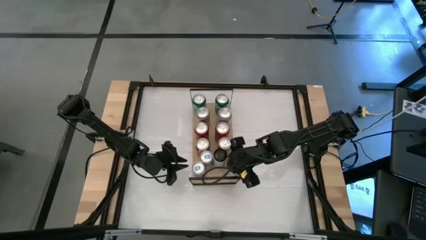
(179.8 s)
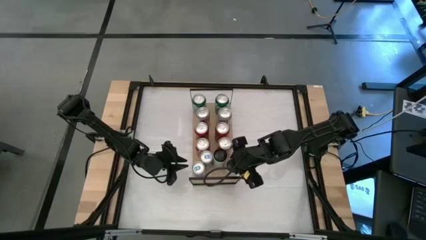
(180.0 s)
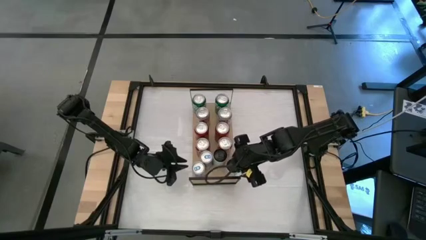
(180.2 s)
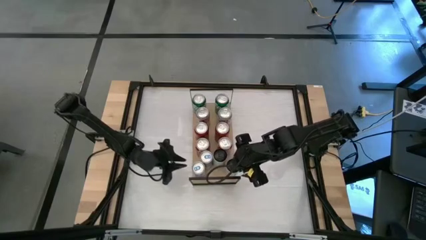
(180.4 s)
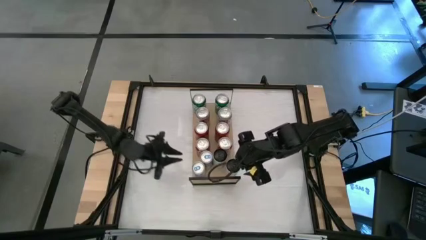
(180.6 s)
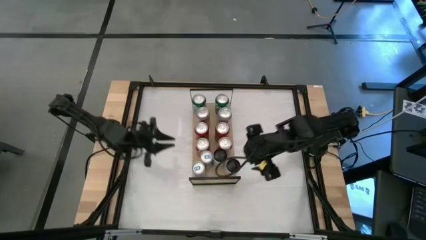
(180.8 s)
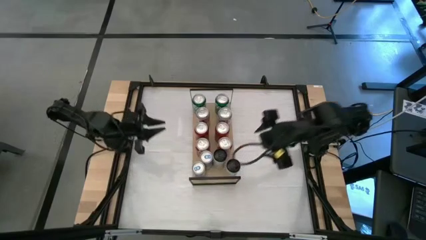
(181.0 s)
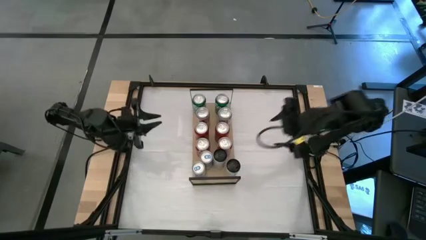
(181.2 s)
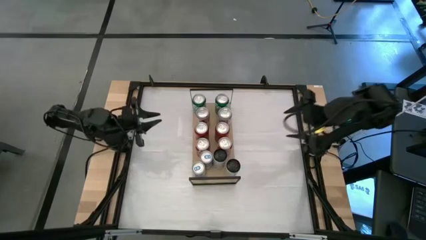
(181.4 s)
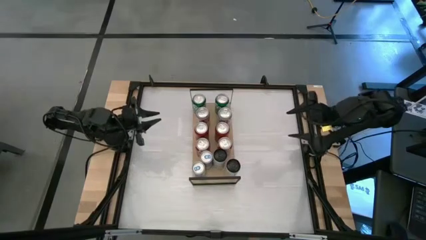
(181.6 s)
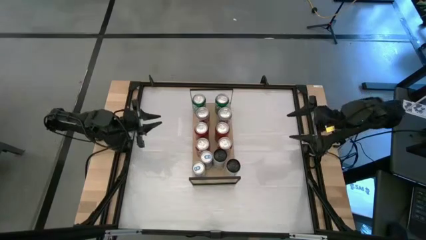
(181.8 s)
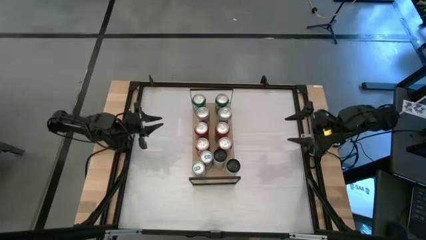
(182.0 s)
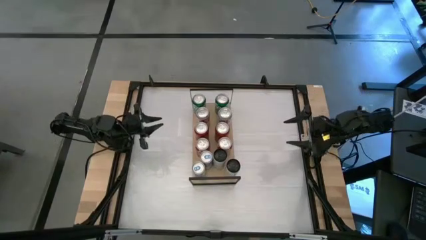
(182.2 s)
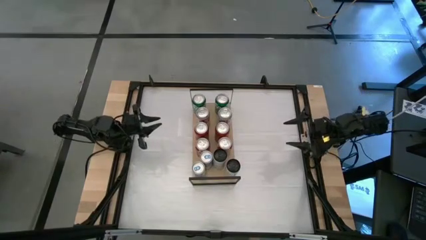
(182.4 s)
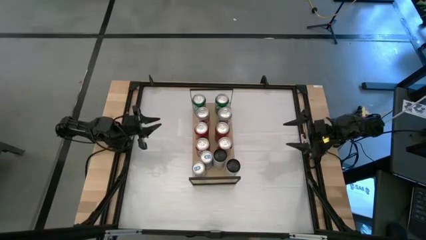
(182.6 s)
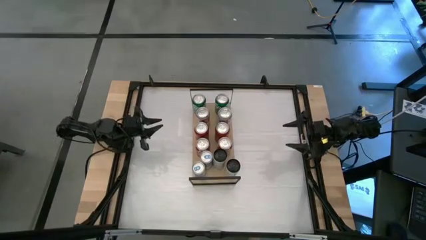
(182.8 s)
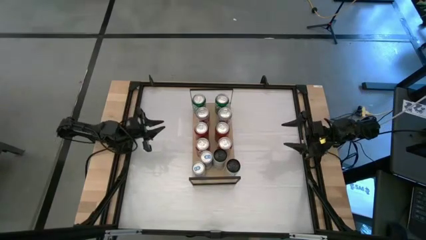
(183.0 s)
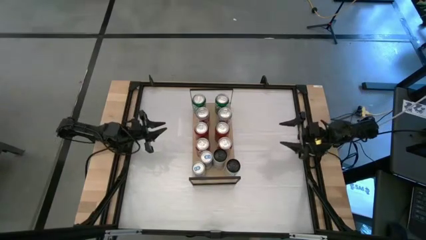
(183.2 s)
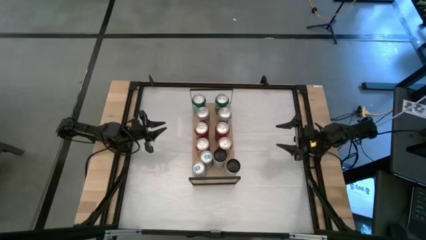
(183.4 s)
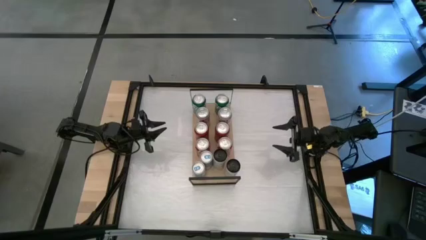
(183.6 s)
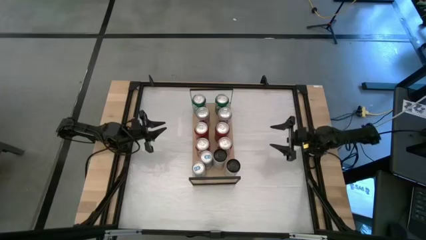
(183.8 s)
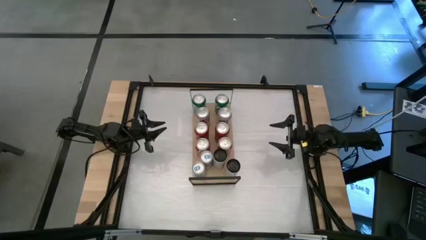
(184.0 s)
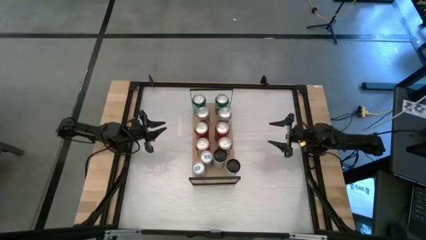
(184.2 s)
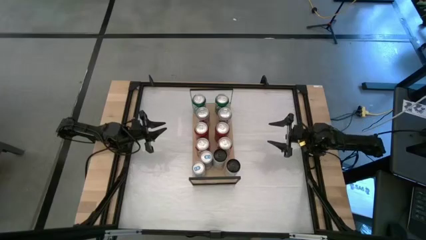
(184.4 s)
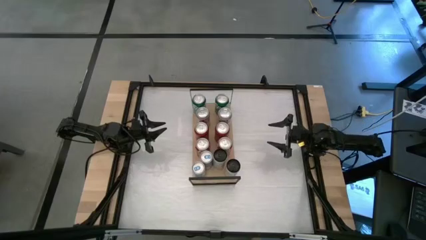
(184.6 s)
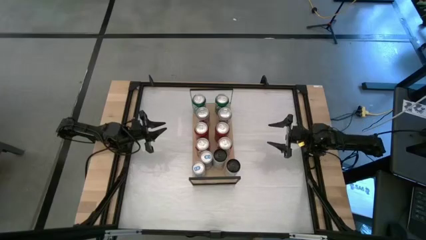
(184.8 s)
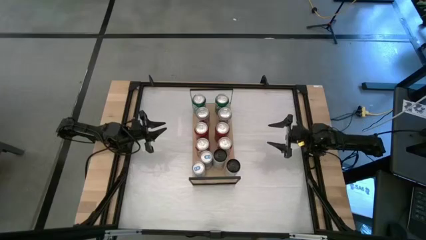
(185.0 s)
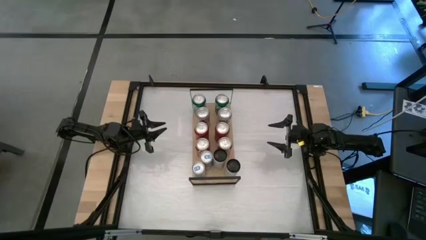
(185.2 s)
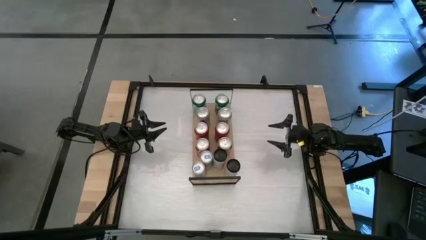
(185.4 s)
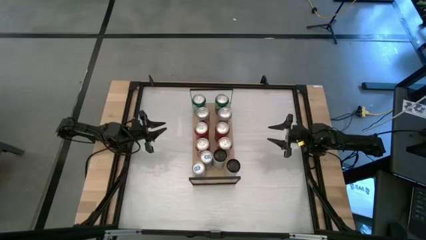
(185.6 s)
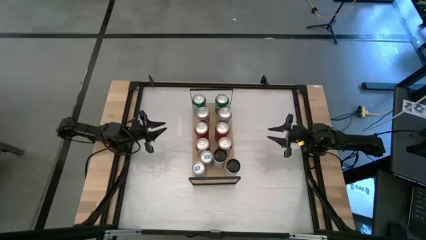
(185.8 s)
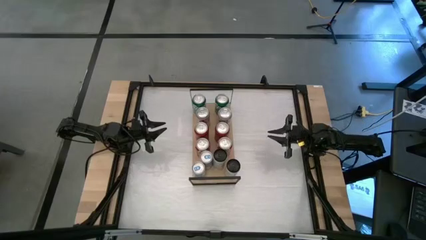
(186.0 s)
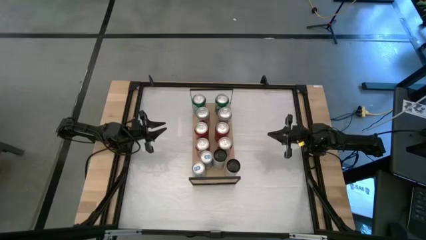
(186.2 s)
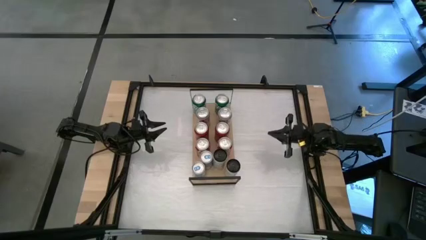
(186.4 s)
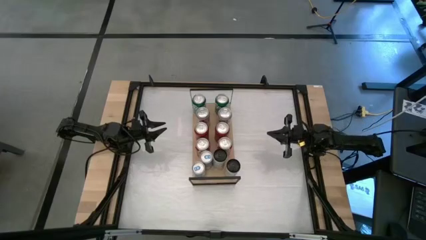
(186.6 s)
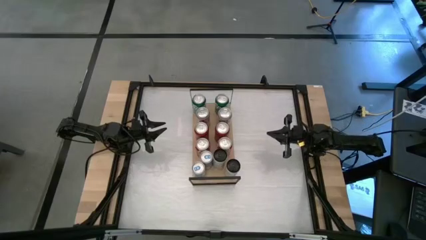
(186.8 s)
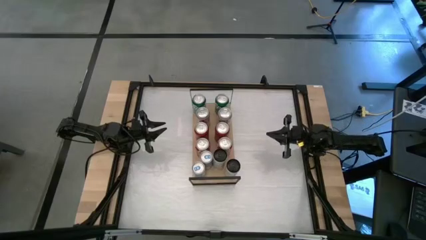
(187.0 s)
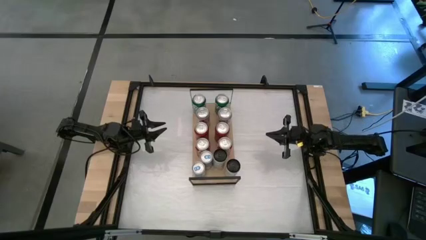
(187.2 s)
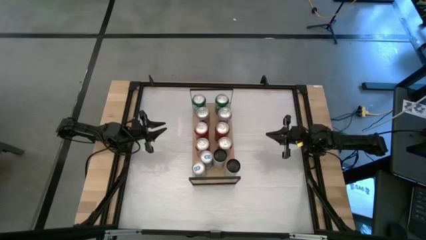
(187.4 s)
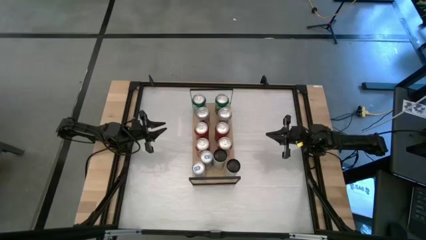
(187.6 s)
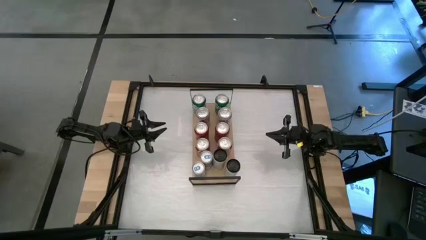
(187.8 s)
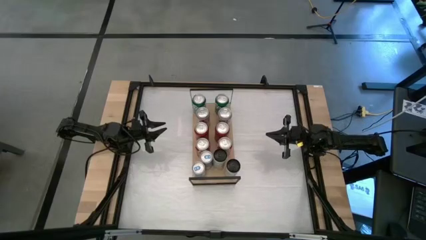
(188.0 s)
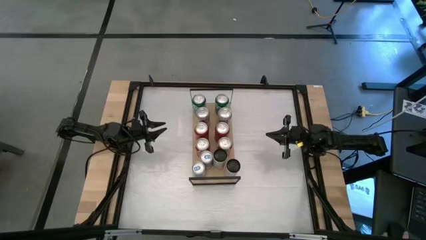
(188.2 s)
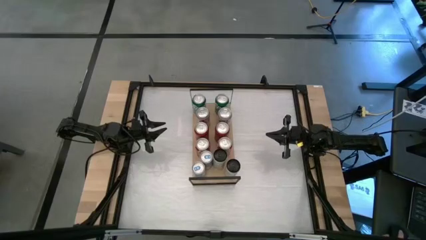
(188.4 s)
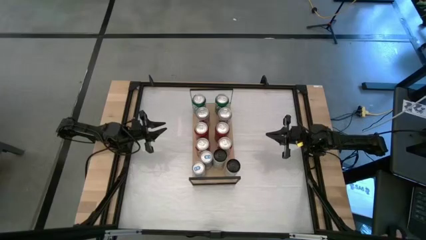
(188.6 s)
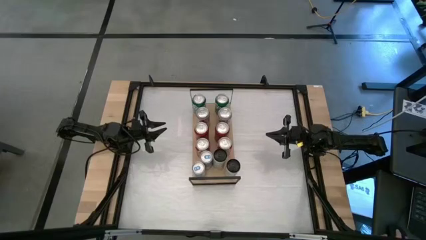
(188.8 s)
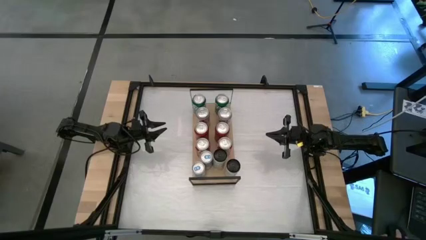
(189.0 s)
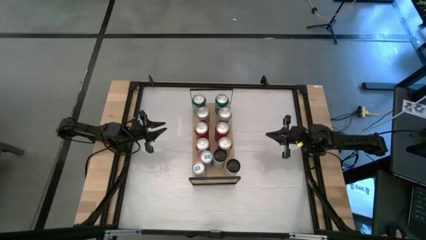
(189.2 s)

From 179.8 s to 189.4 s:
Task: Place canned beverage on shelf
Return to Home Position

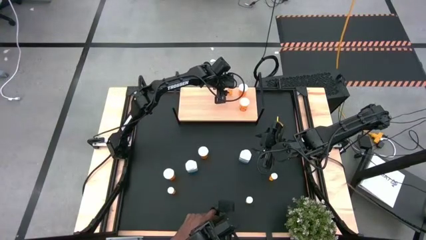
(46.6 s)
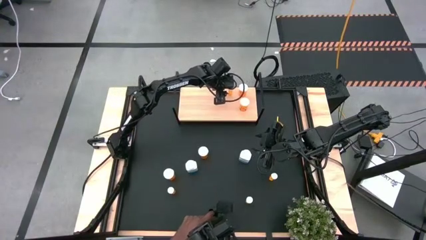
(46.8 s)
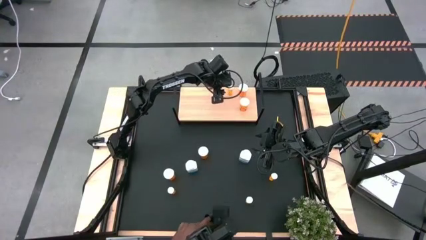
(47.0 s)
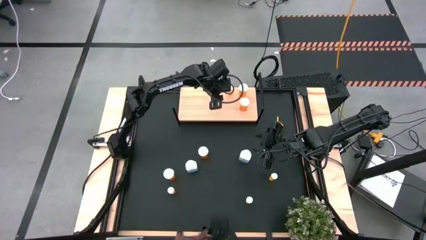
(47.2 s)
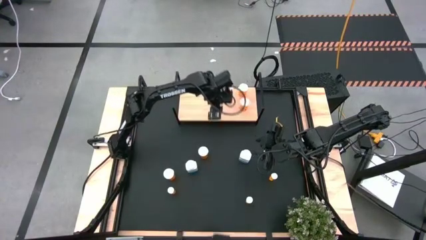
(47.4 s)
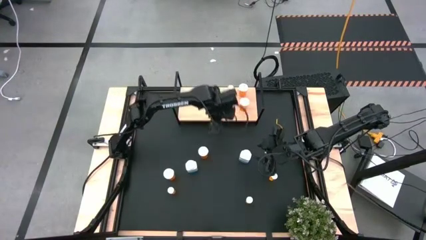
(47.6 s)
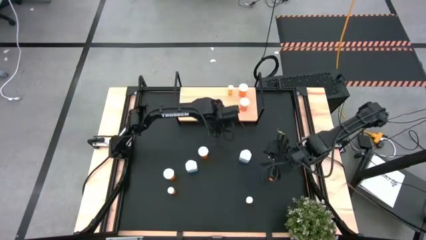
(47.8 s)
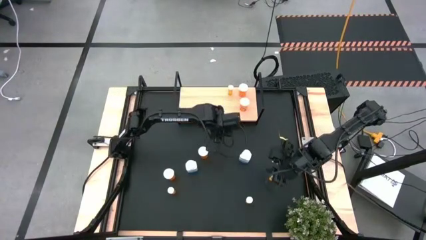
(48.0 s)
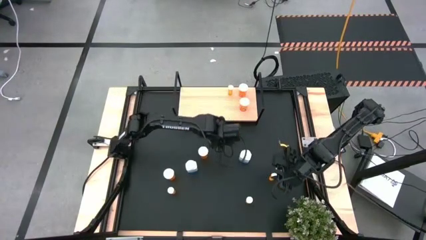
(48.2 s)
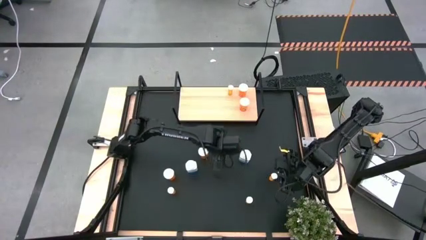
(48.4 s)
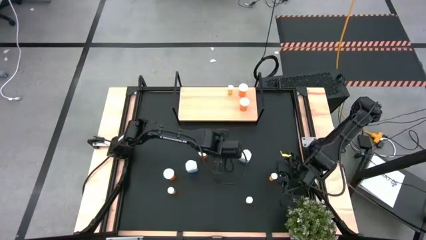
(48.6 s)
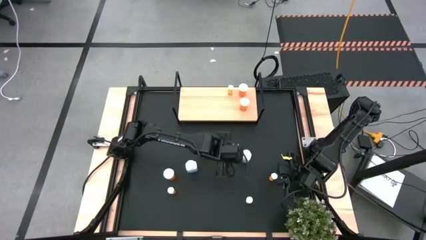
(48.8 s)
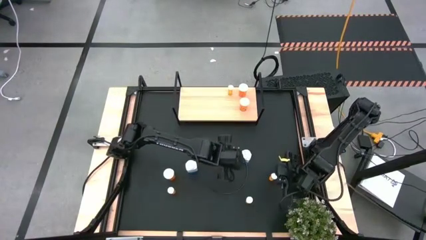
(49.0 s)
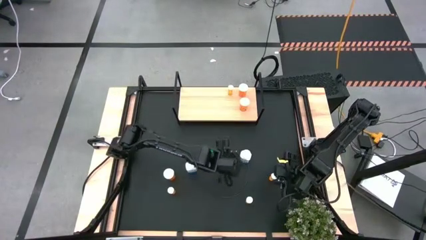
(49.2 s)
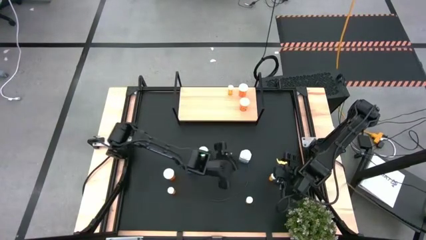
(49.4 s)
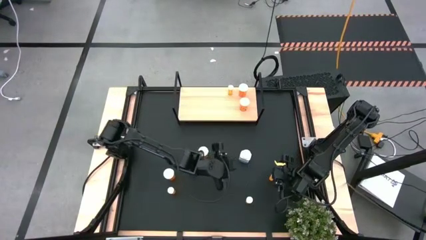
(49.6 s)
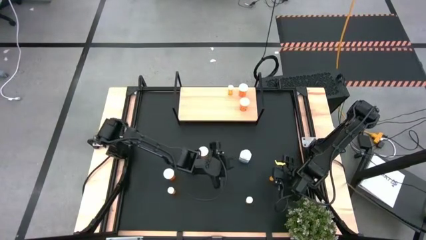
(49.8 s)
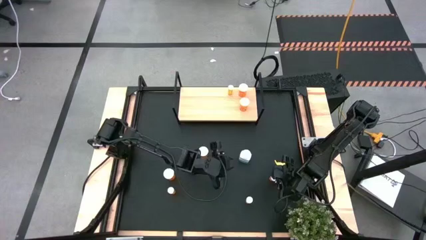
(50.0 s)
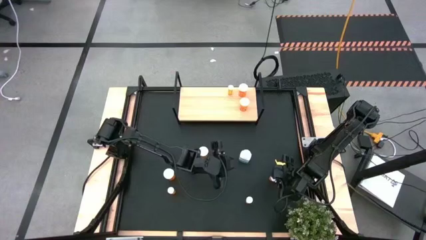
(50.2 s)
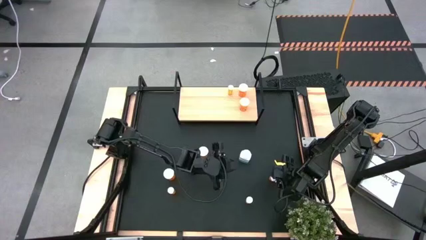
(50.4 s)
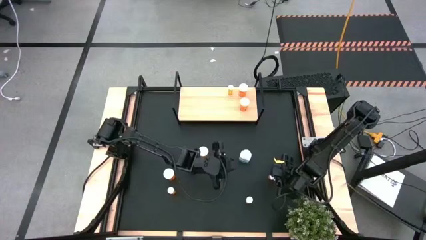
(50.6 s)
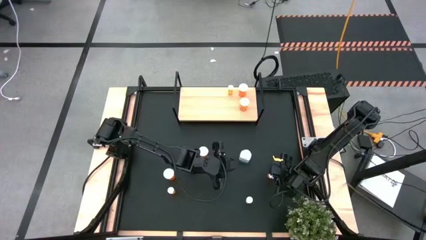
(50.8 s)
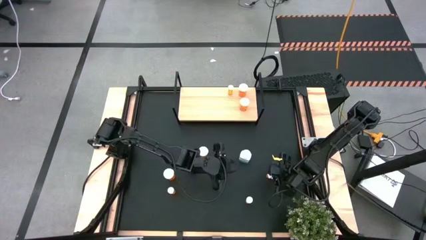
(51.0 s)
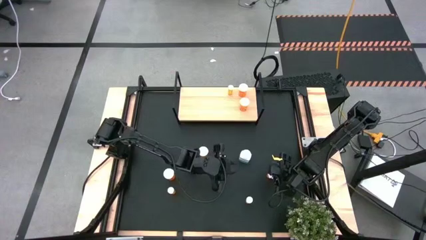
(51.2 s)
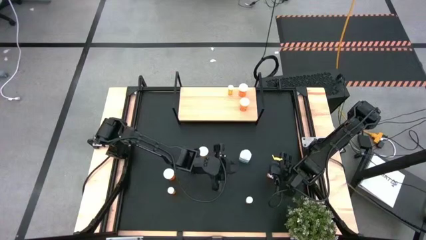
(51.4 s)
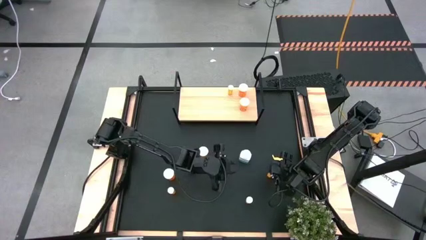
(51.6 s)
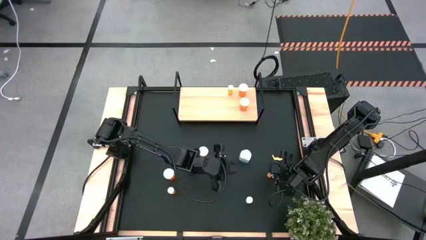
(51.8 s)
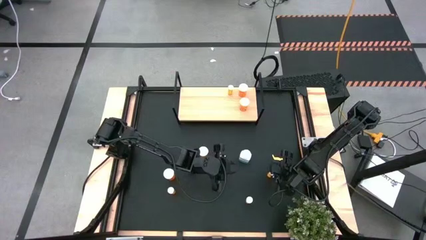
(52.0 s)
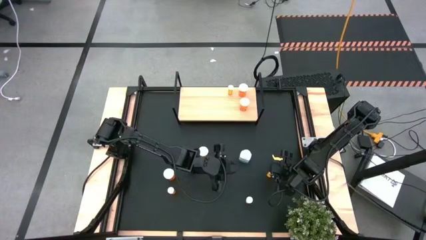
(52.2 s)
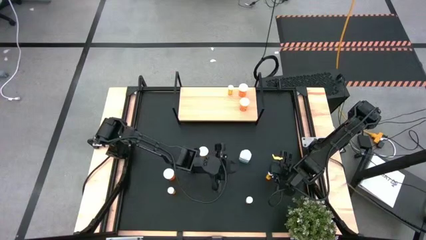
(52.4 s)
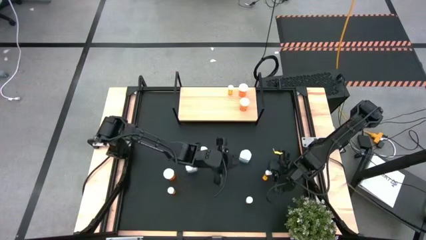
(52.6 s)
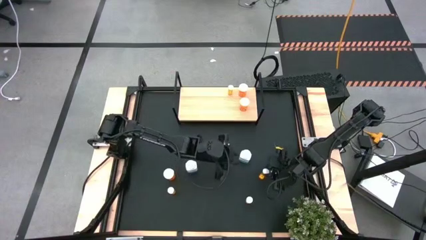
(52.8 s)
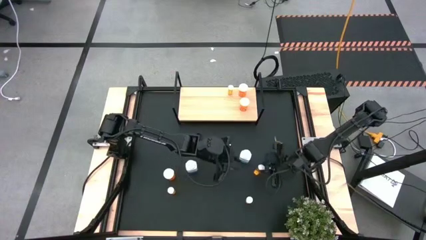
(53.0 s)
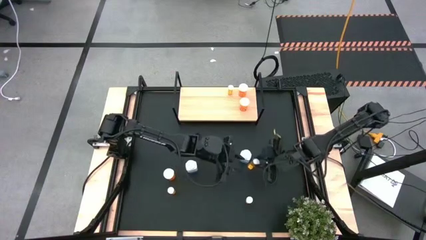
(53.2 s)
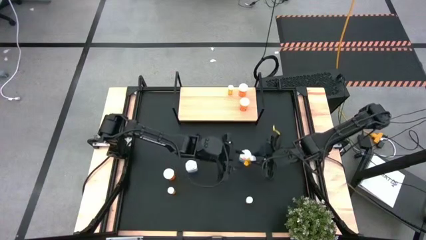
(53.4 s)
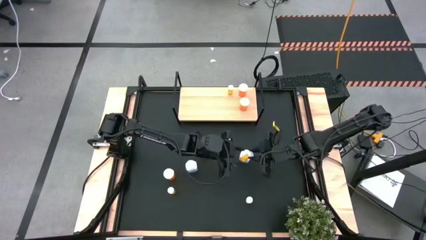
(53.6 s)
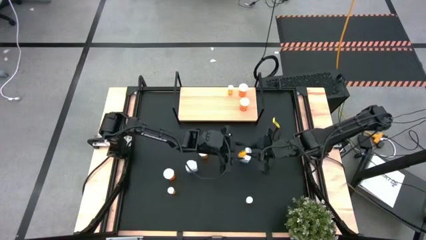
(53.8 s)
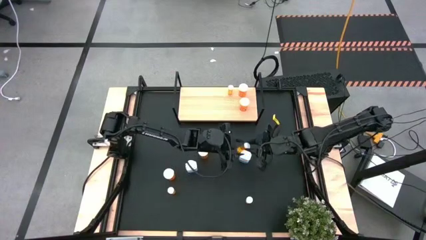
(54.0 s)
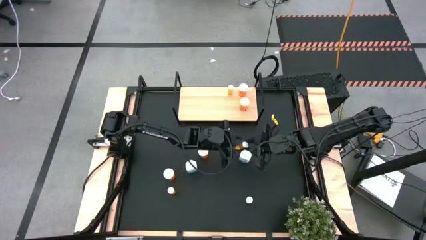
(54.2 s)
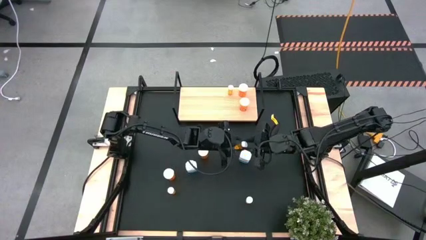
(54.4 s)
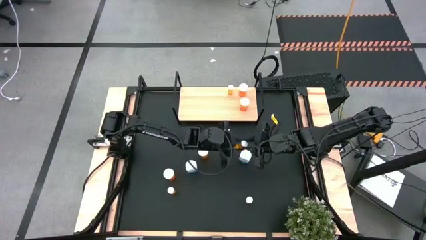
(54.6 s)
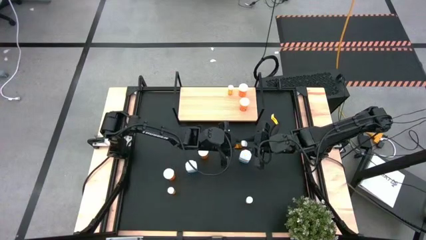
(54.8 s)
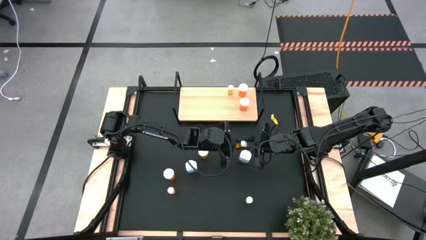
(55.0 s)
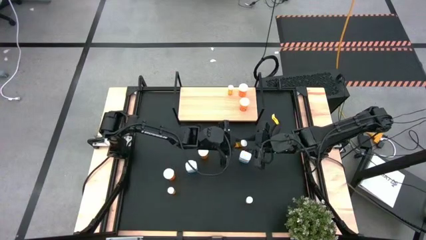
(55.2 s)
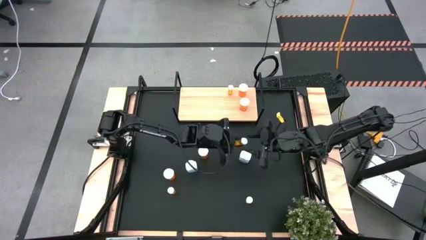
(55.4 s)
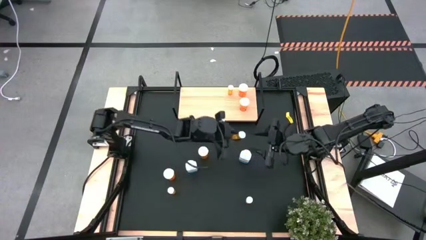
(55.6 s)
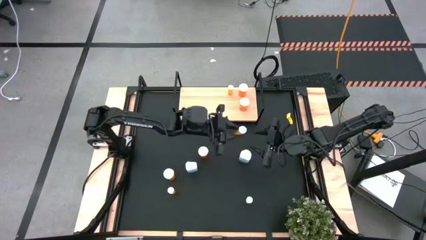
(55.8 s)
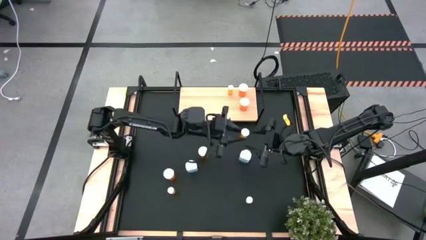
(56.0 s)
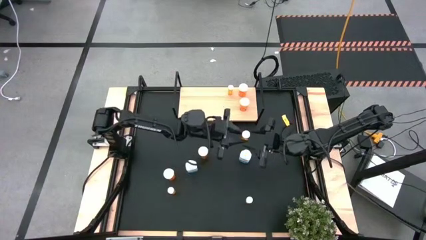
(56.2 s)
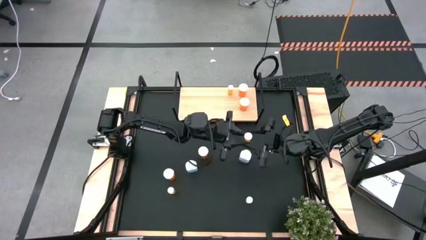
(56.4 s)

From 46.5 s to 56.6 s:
Task: Pick and place medicine bottles onto shelf by color
Put the top right small orange pill bottle aligned with the other small orange pill bottle on the shelf
